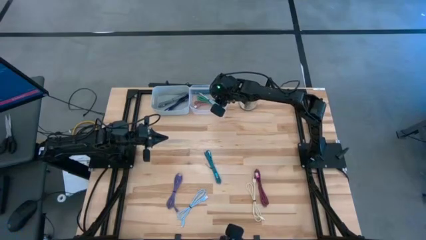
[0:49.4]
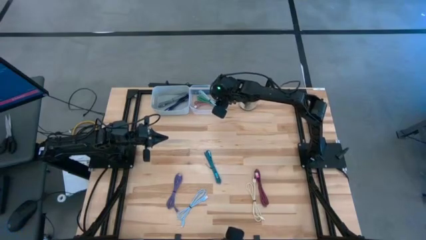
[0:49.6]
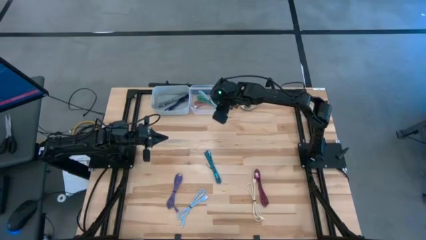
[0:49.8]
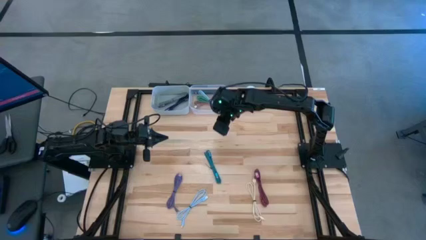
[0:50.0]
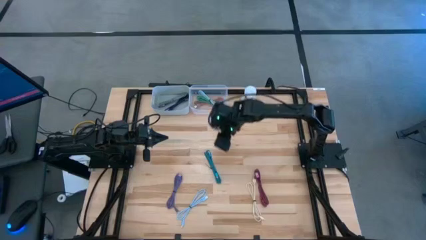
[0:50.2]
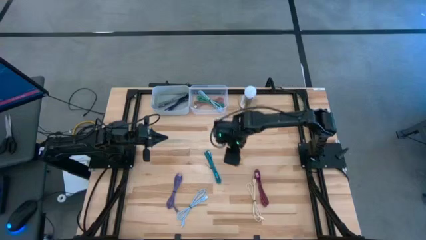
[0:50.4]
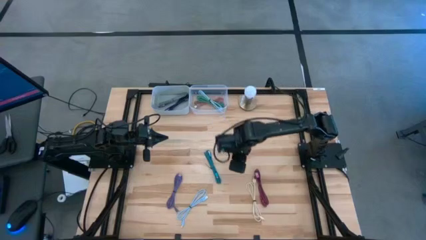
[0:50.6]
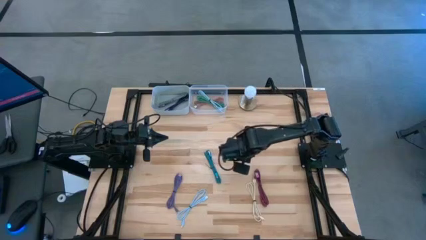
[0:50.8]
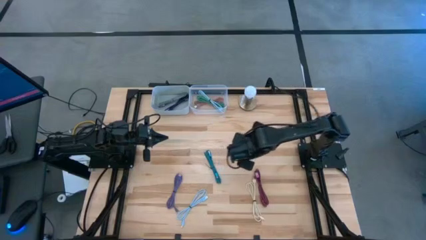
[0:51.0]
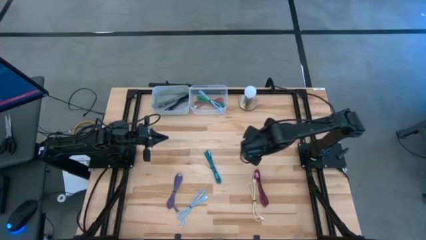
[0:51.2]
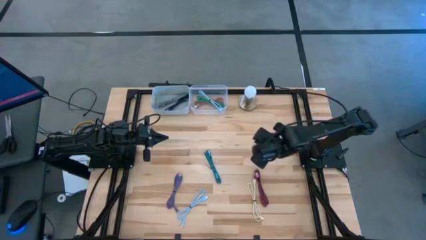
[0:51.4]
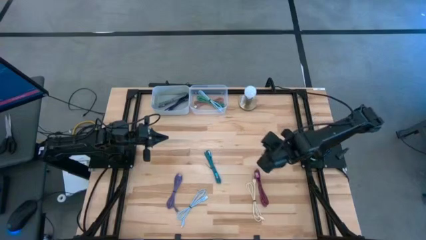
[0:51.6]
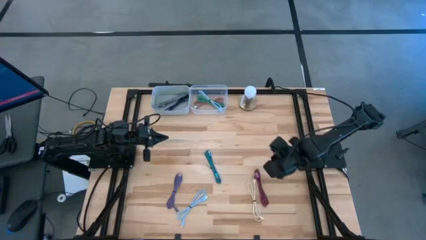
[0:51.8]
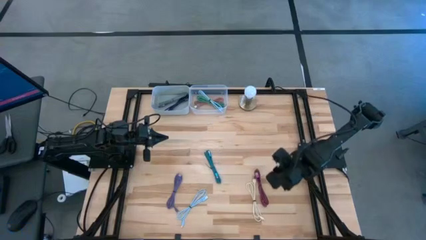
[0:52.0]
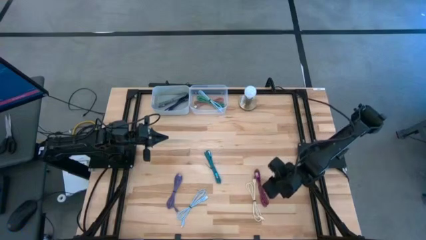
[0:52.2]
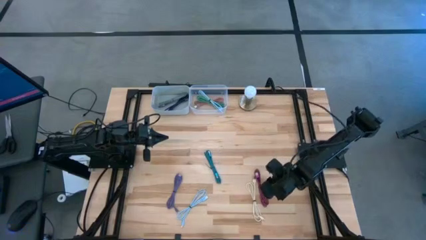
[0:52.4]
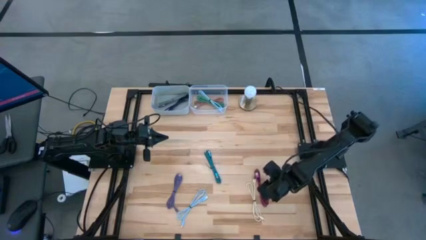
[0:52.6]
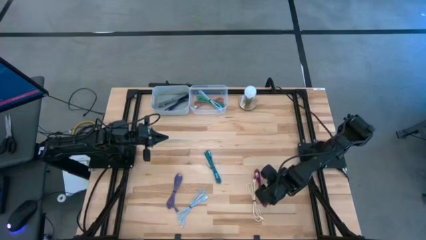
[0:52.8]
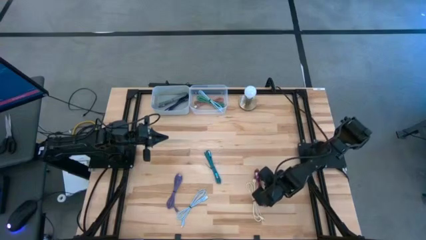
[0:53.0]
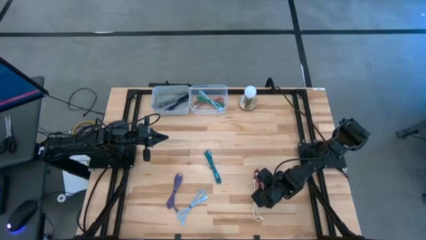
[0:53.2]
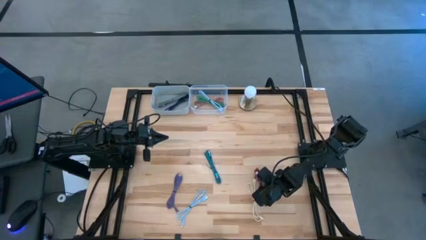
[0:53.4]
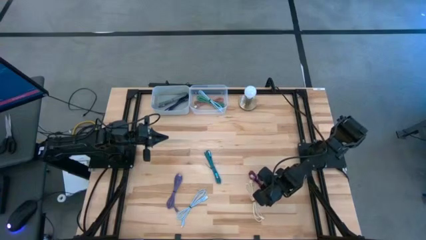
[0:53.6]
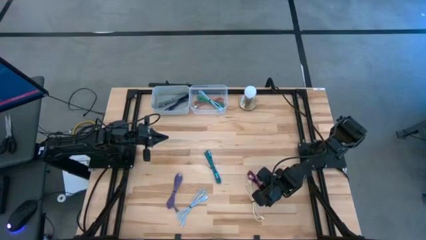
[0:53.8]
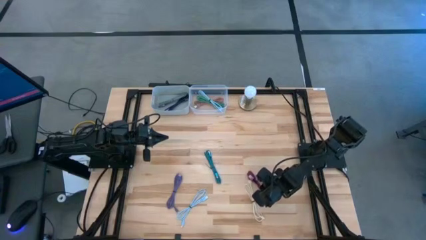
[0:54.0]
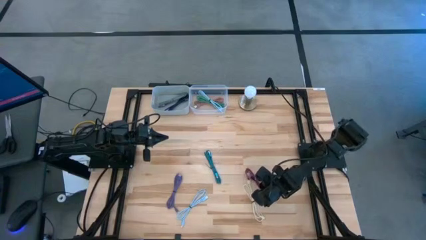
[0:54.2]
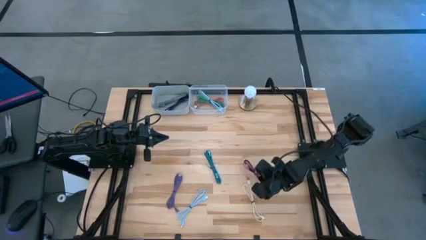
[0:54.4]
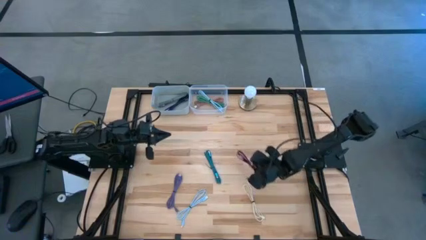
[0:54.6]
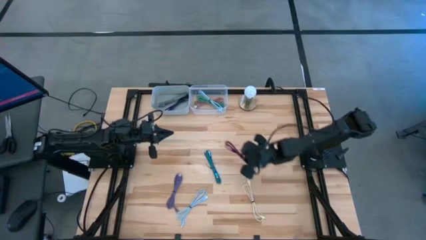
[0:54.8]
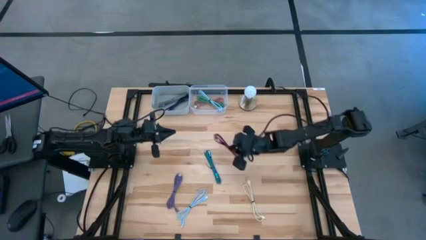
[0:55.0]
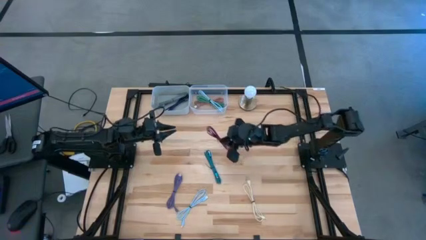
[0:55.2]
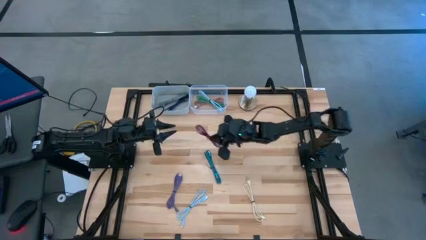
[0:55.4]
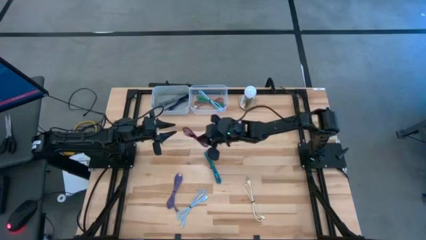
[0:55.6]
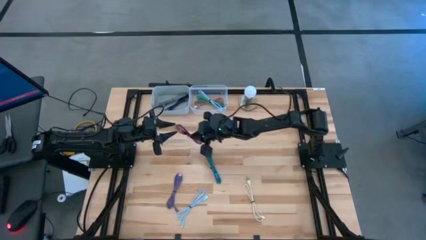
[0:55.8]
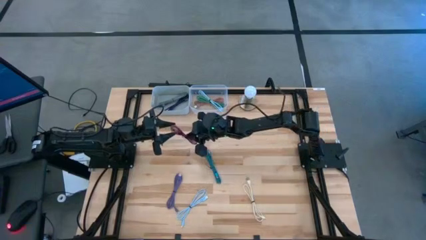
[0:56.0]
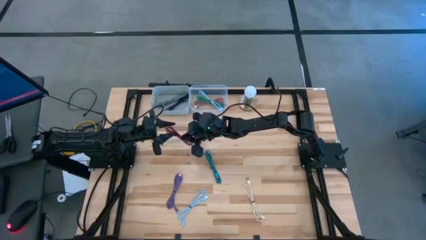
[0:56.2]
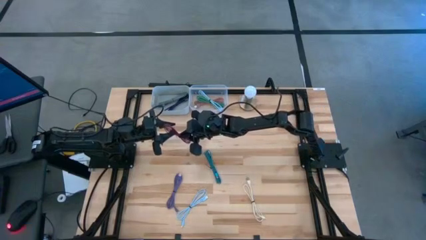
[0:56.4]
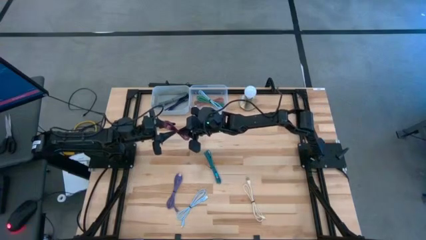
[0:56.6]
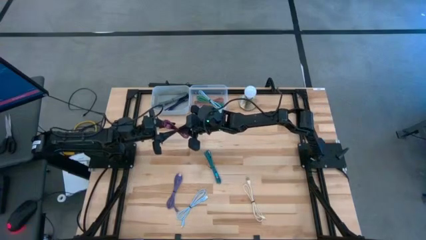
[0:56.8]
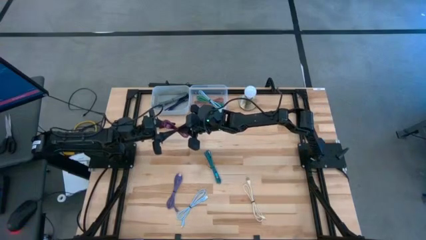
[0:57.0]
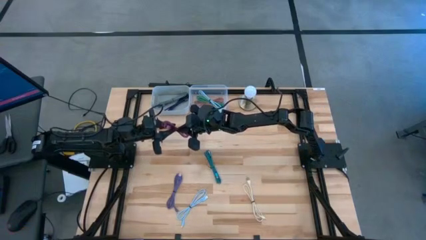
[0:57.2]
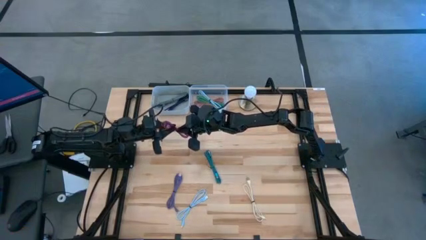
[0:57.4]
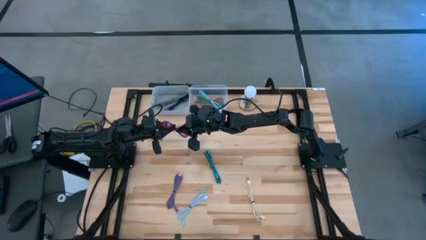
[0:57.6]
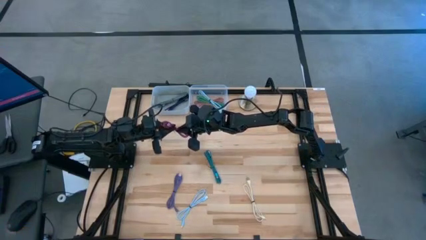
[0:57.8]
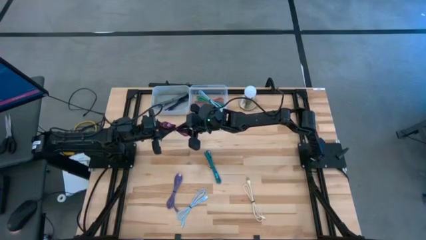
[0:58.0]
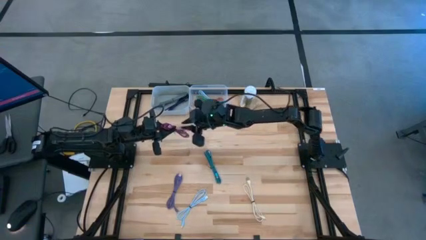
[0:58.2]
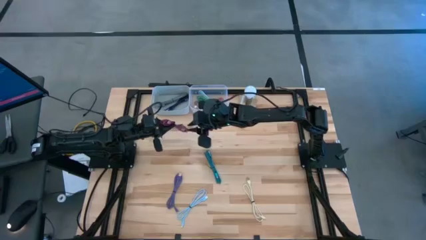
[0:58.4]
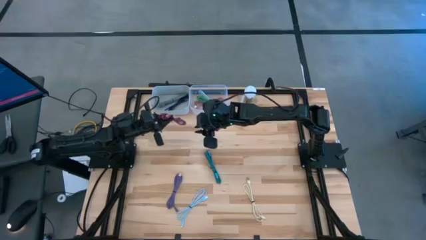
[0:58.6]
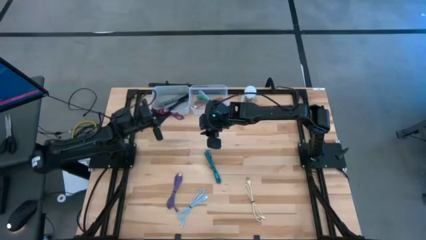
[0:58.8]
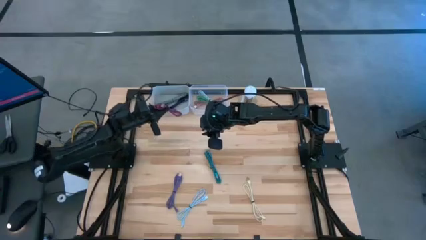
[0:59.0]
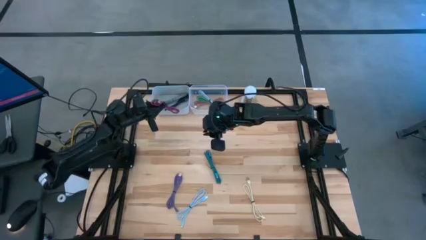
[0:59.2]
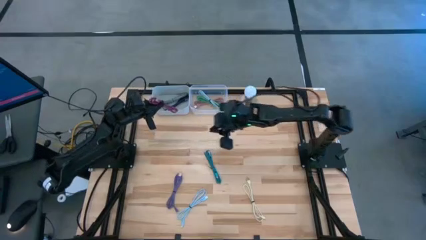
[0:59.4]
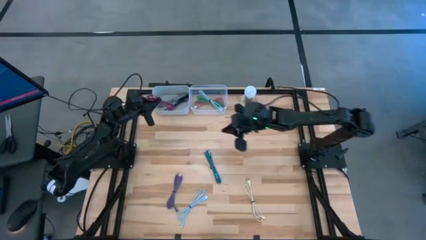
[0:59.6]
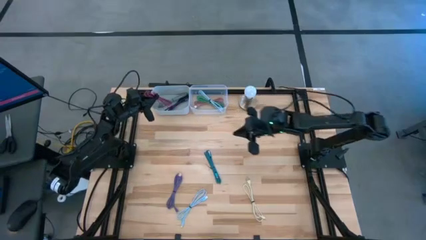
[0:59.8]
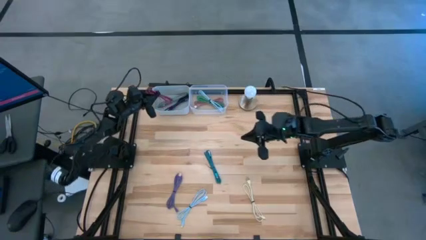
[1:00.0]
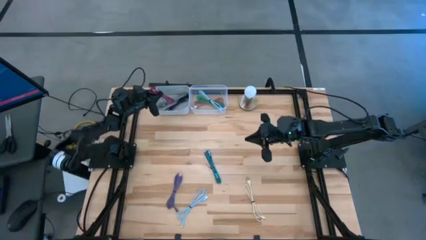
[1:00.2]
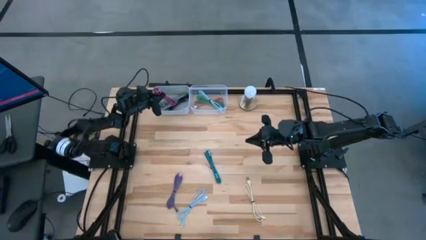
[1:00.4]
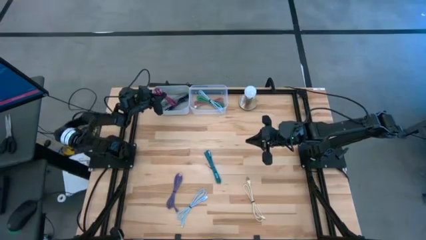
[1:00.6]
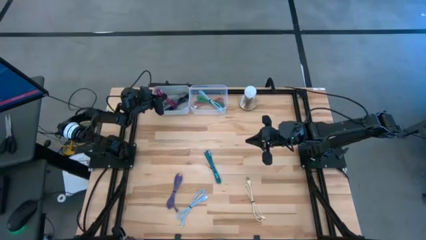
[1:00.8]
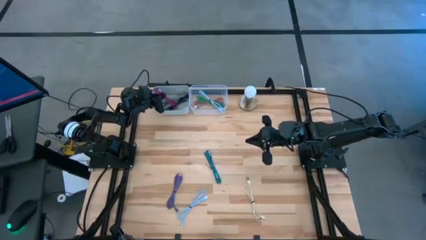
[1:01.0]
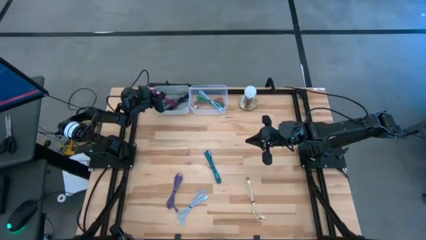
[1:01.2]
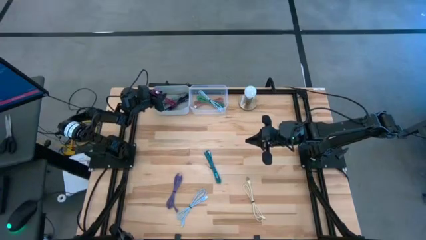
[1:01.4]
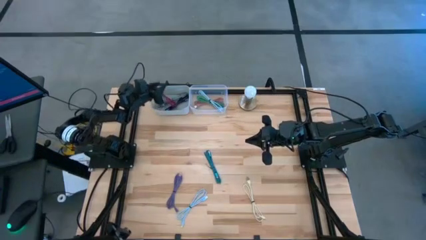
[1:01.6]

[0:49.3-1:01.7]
Task: Pick & Place USB Port
Put the pink and black USB cable into the gray bin

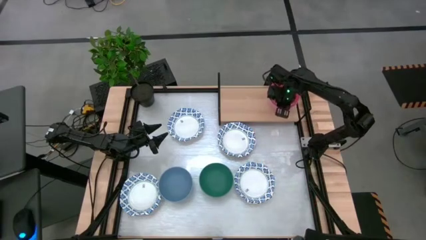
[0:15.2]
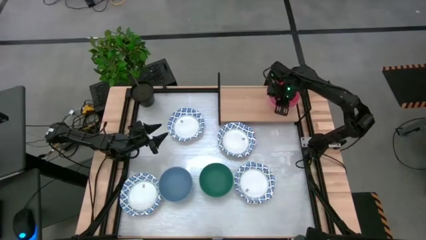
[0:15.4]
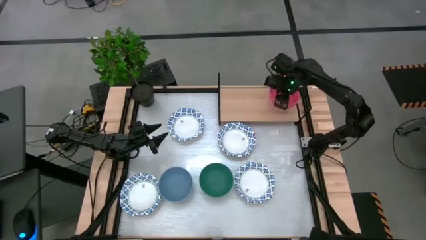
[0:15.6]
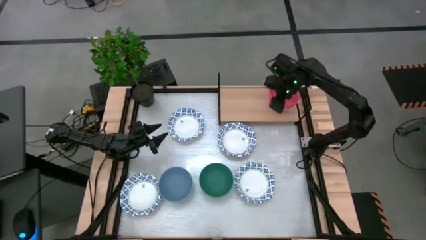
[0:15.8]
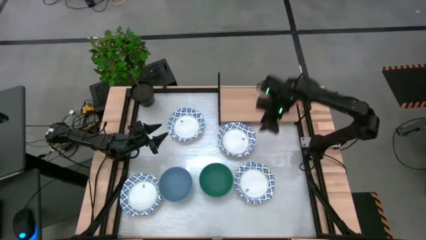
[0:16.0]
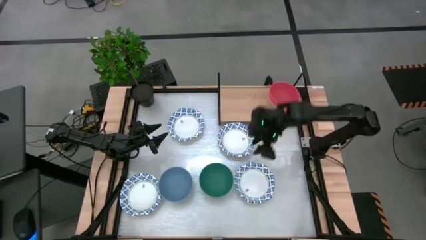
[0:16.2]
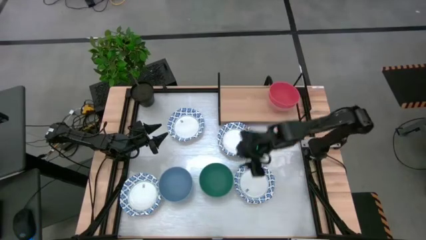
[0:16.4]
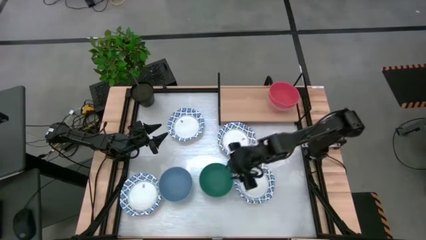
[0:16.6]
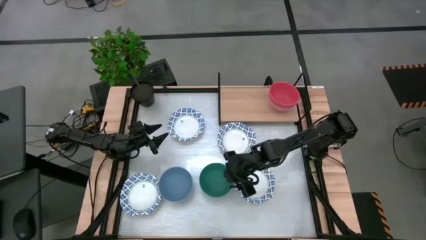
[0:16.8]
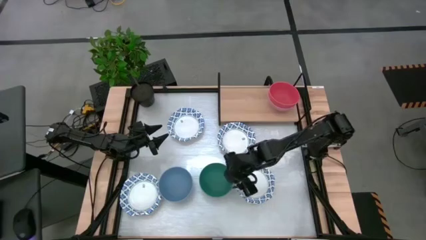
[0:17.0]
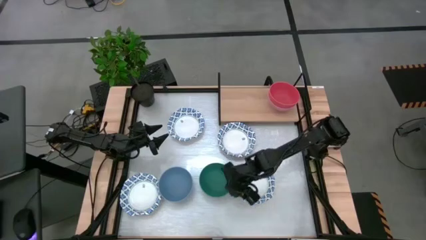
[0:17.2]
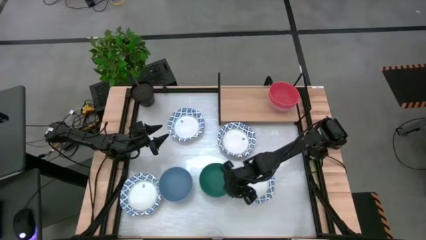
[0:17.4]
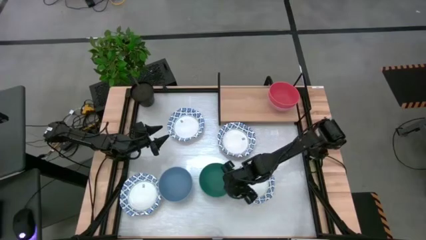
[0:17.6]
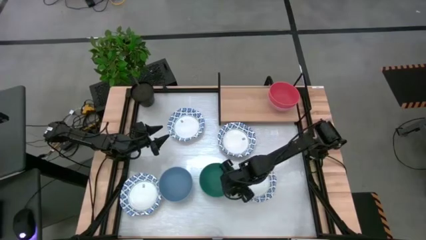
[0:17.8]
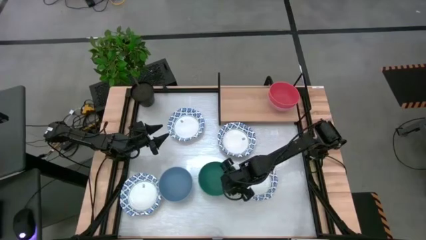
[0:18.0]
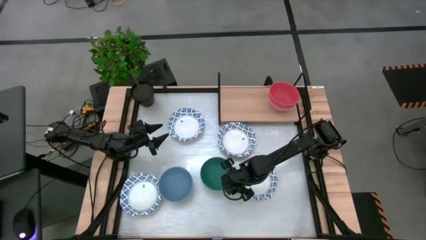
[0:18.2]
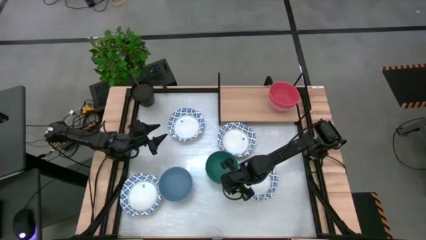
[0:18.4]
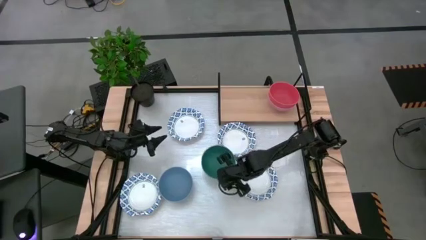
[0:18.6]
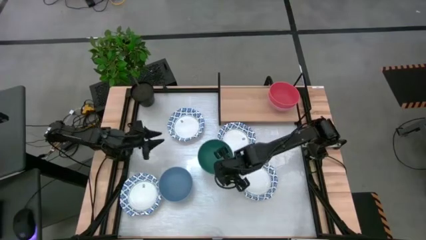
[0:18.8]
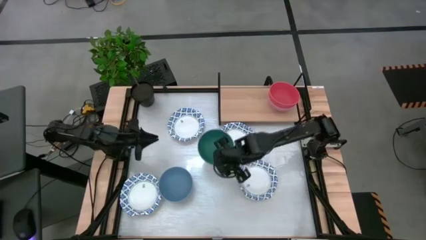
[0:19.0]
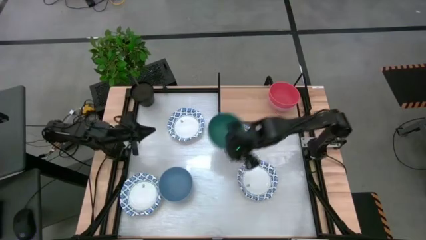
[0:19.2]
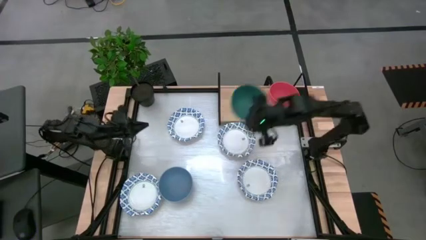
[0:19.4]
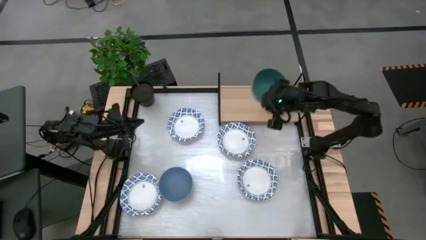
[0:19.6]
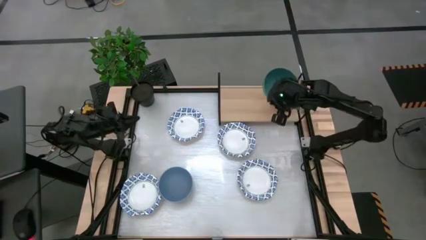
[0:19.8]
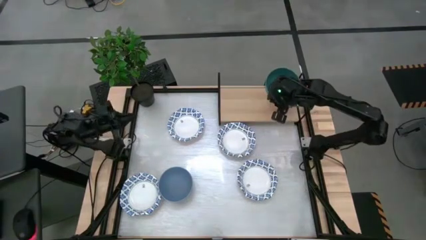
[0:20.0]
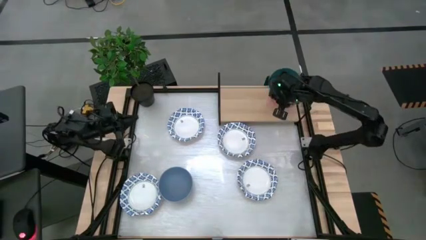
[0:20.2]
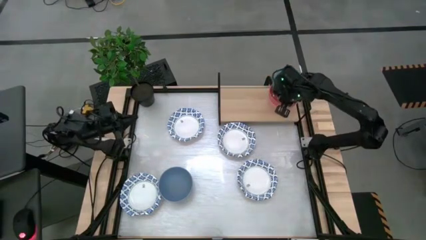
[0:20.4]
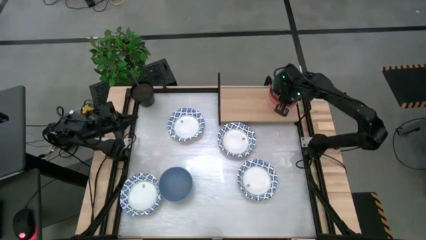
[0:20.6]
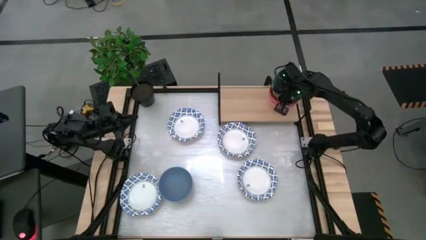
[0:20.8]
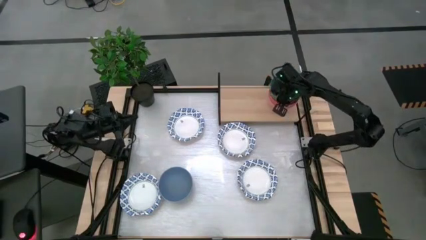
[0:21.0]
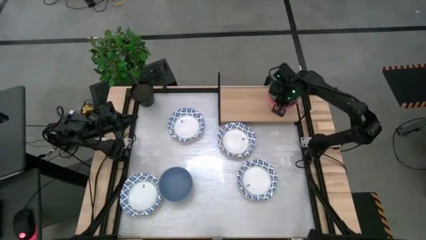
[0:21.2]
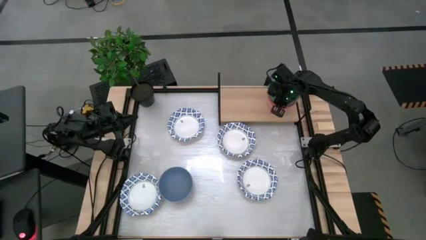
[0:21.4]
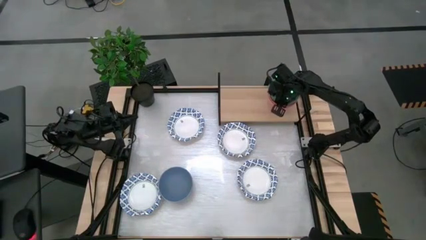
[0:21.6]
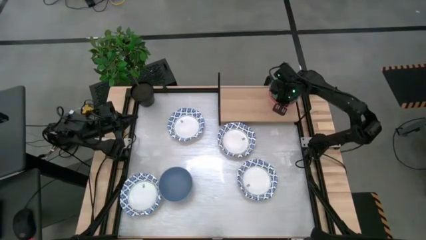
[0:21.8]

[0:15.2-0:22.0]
Task: Place and stack bowls onto a shelf
Stack the green bowl on top of the orange bowl on the shelf
